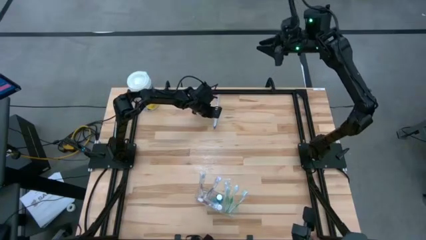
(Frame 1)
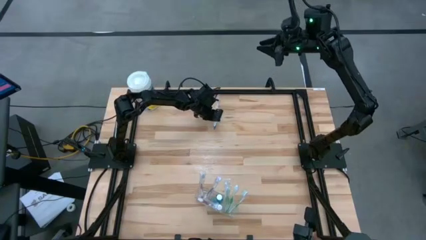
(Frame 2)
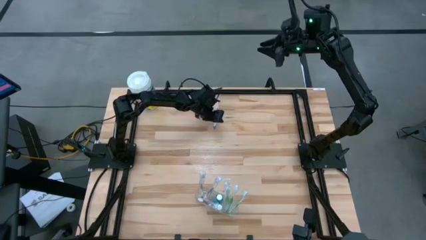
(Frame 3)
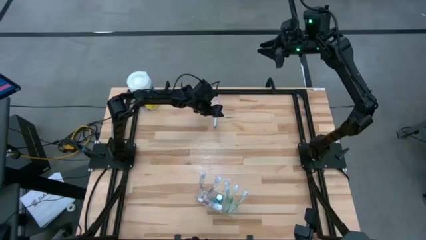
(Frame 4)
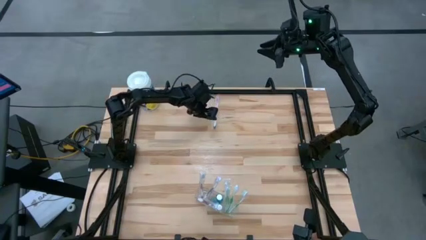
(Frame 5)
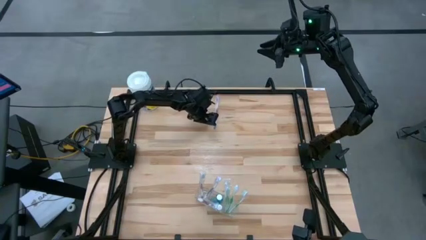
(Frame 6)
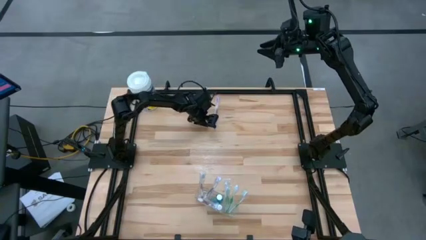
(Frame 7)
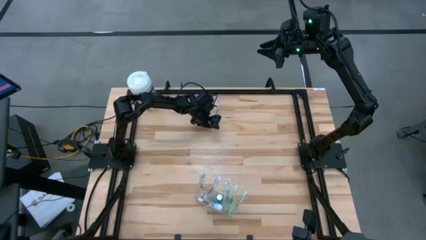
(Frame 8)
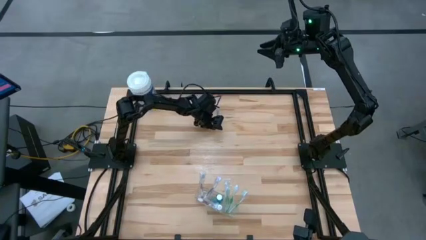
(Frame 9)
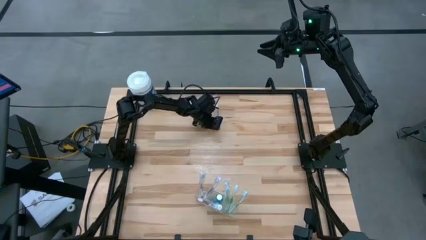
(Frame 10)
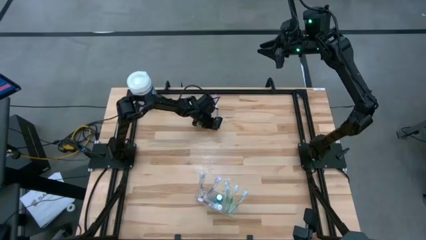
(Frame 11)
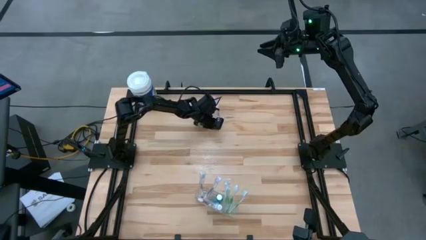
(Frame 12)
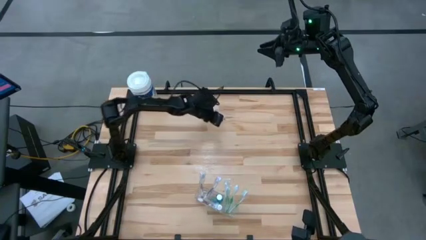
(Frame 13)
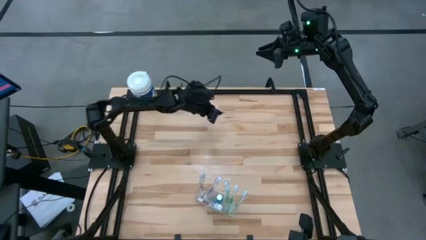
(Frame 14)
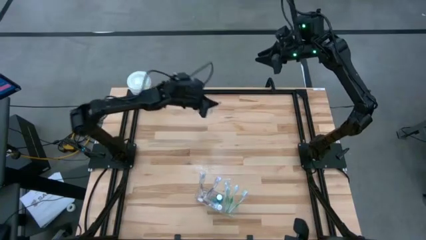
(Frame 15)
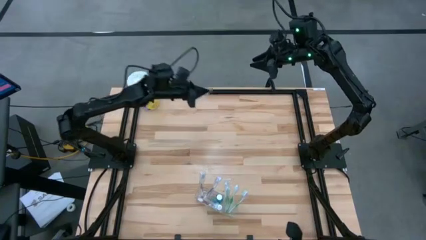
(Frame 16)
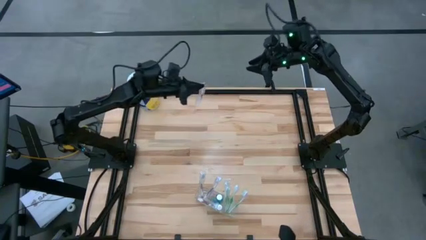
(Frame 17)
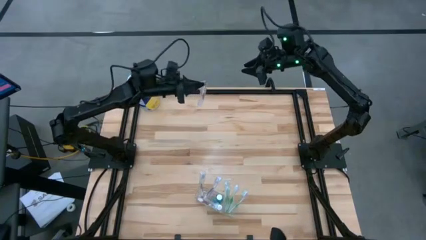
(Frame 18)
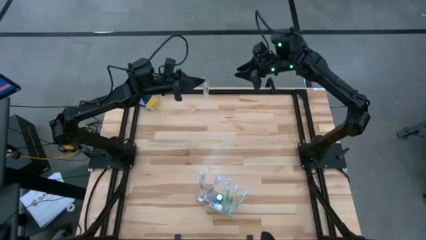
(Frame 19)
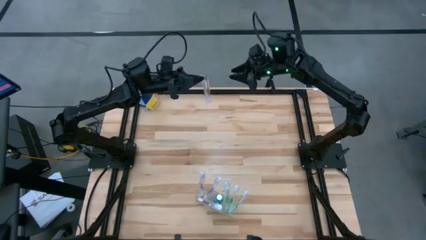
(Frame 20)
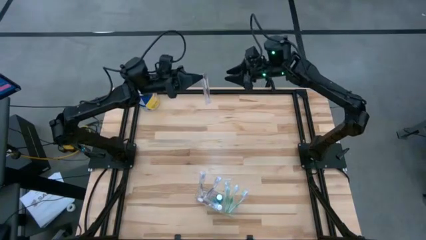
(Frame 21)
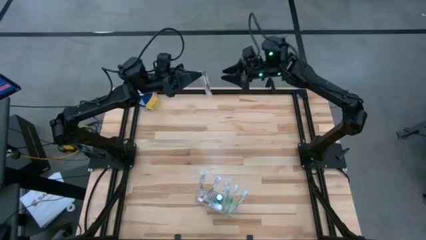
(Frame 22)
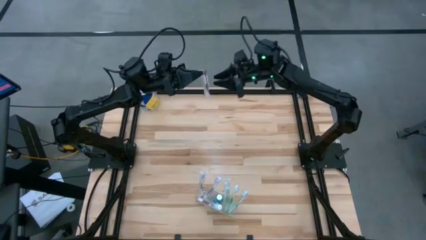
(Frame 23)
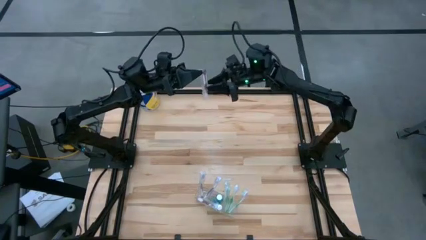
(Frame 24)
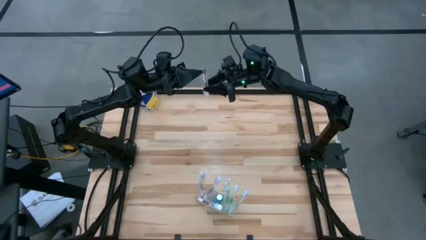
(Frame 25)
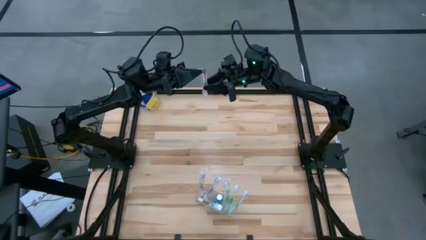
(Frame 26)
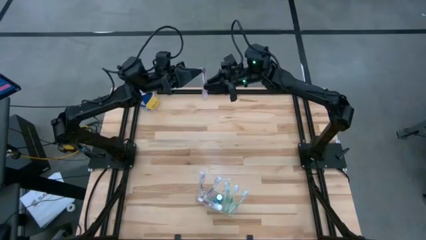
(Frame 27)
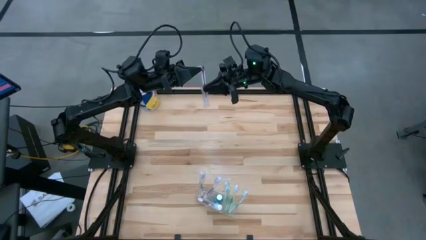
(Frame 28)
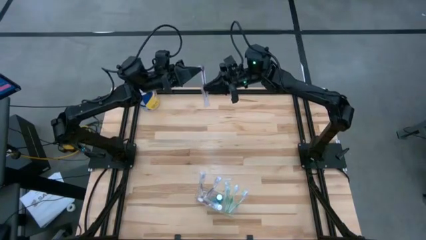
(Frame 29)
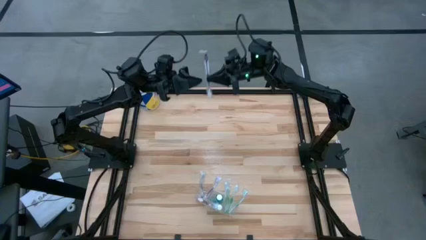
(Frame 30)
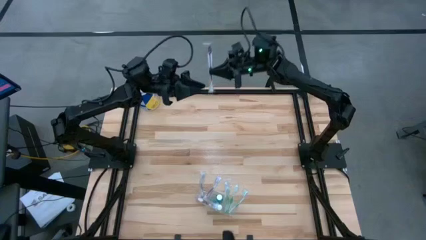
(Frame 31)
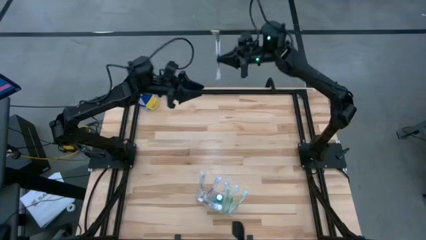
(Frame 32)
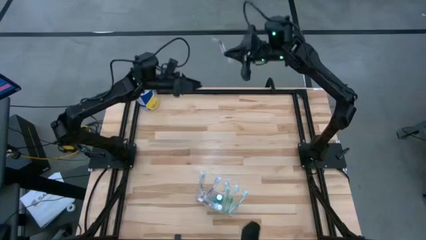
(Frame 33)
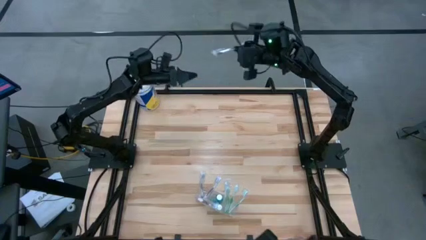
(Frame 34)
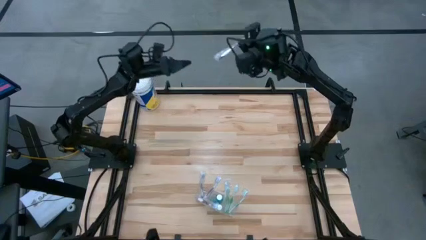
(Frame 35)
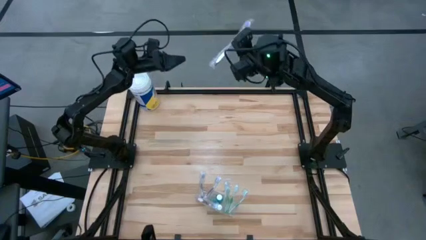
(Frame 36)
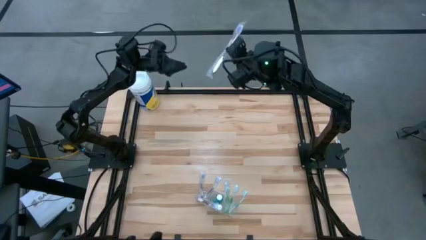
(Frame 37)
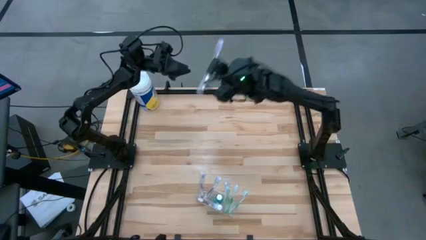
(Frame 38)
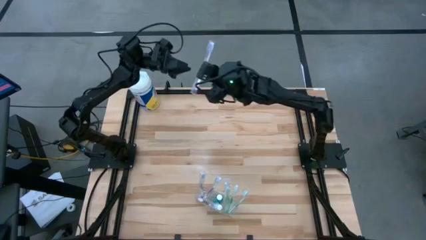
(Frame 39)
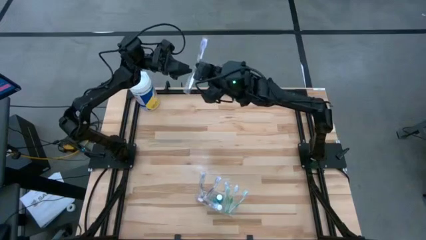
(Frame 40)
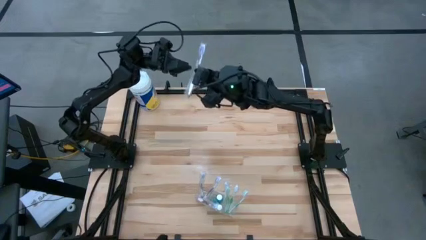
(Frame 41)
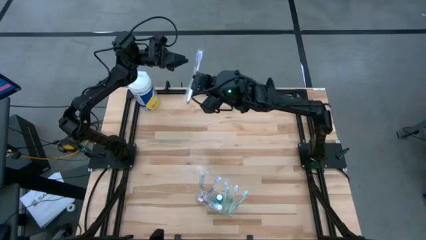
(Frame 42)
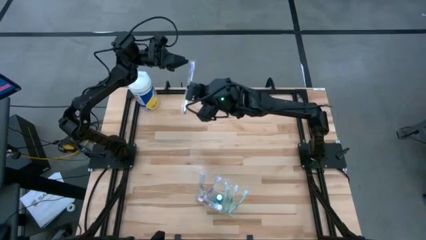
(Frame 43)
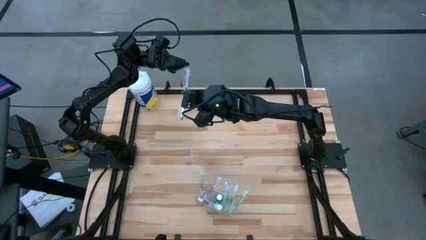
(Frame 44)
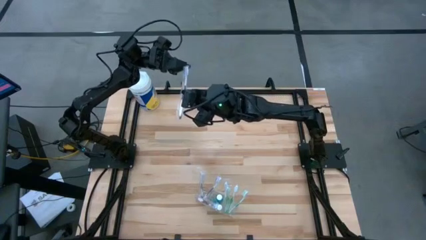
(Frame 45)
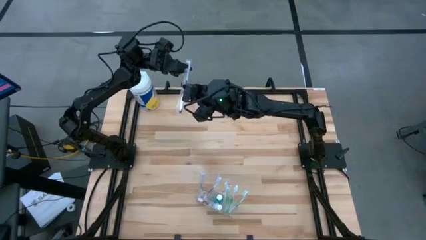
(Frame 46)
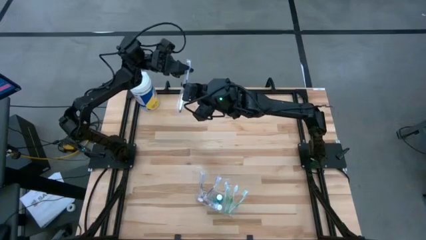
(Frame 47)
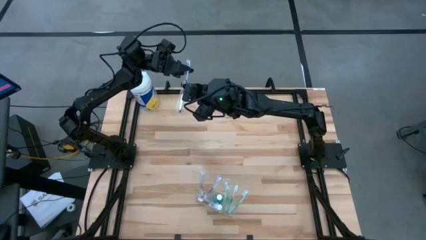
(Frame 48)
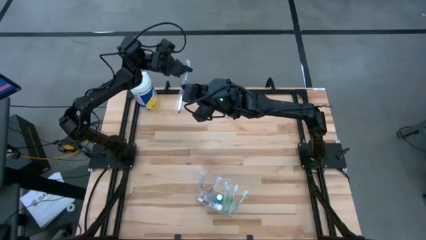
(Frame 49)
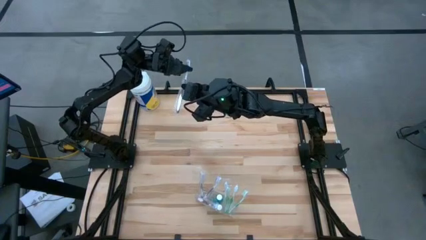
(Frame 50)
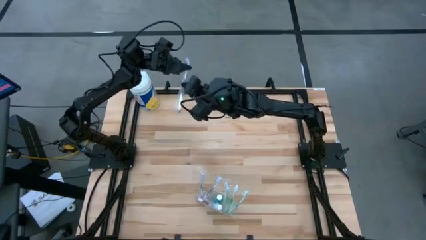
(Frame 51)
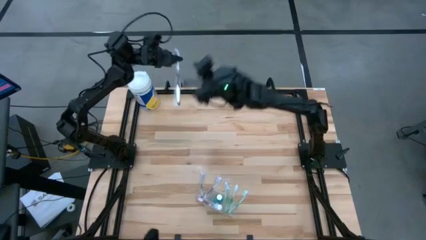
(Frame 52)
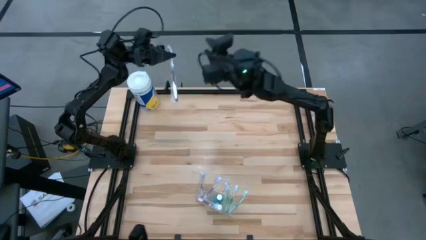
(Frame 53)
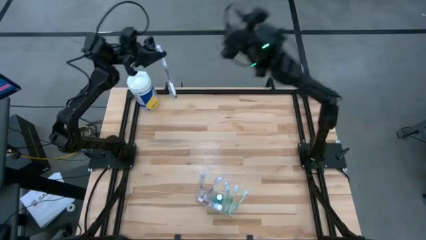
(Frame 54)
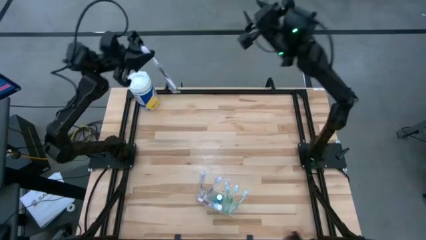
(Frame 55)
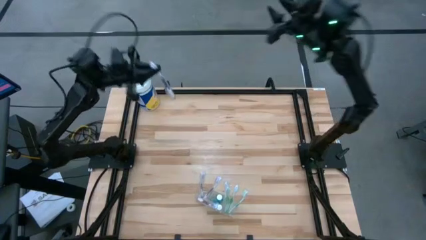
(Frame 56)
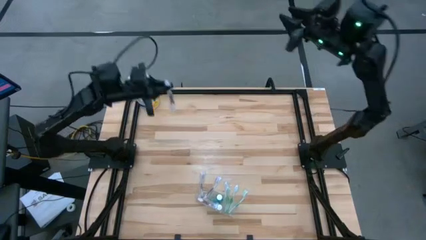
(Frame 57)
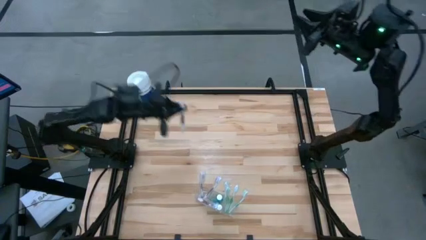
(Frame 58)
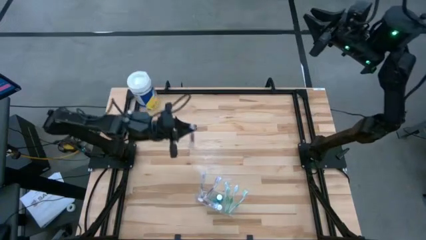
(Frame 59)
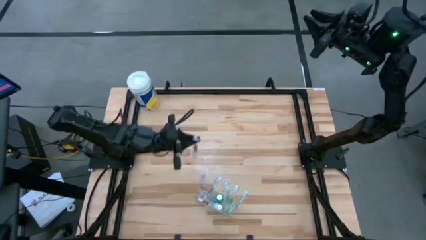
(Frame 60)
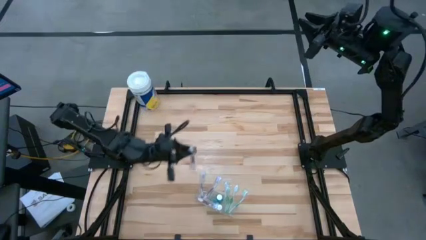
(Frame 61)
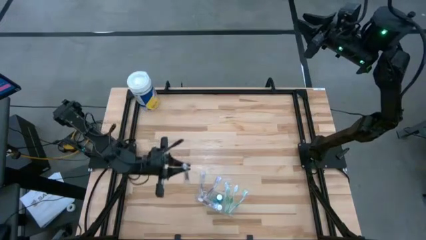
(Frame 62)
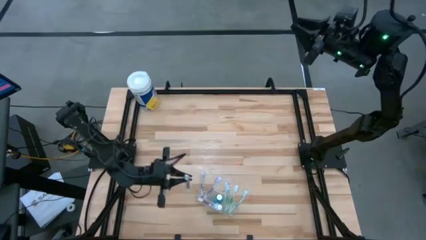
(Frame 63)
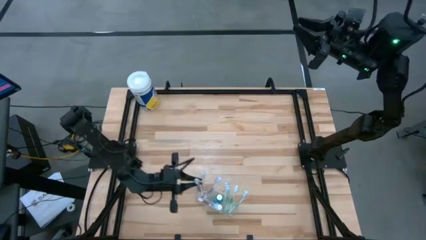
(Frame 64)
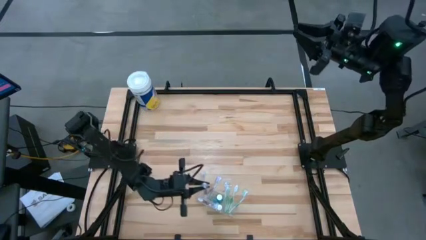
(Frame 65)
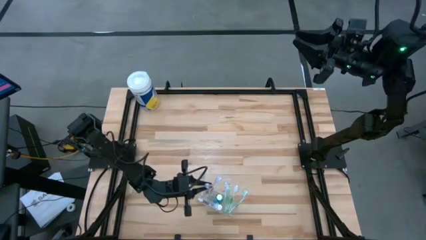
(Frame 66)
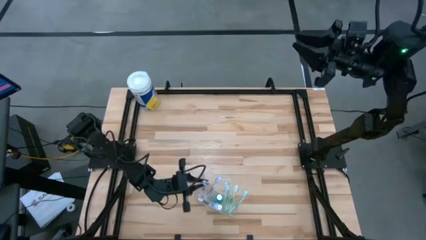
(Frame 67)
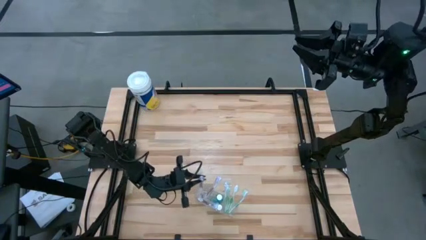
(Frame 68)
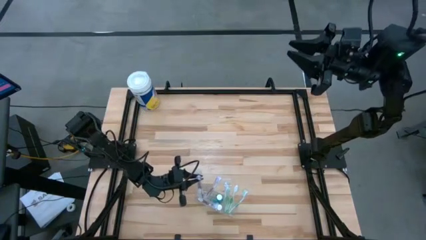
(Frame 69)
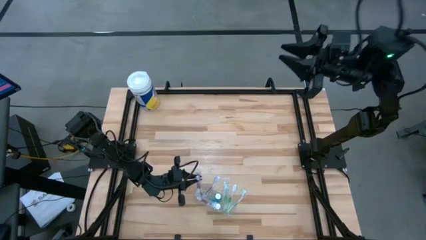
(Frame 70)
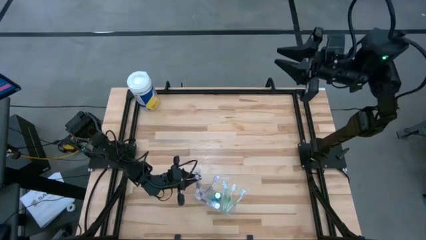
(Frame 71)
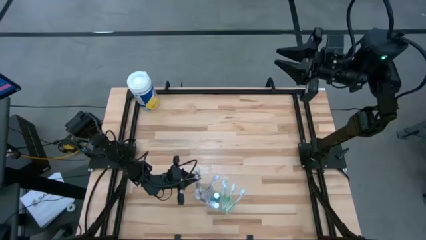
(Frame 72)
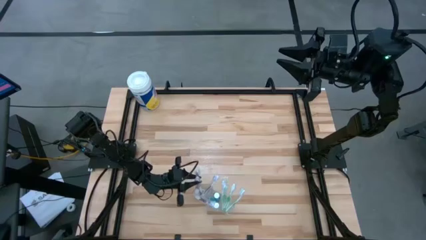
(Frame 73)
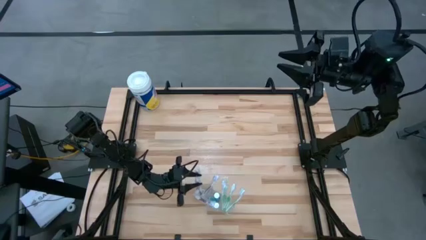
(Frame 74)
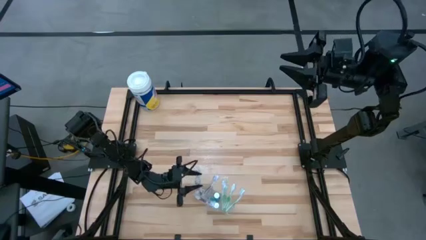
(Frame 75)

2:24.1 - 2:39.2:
Task: Pick & Place toothbrushing station
Put the purple toothbrush in the transparent organizer

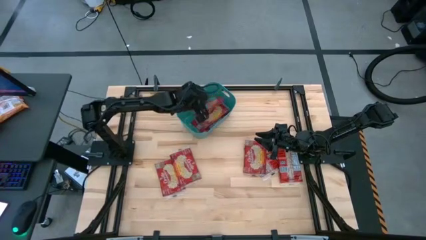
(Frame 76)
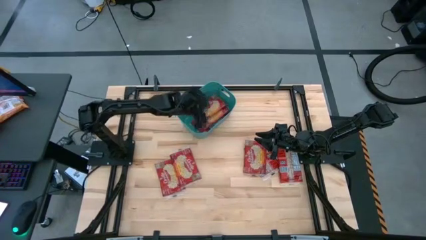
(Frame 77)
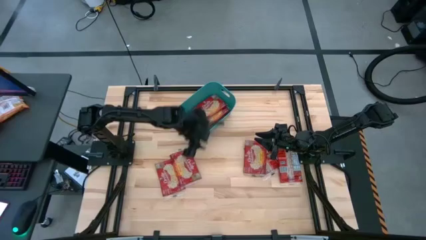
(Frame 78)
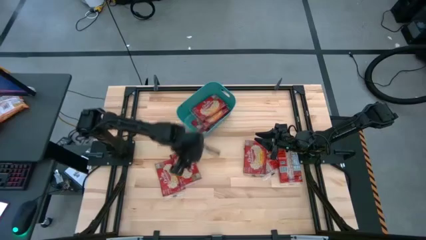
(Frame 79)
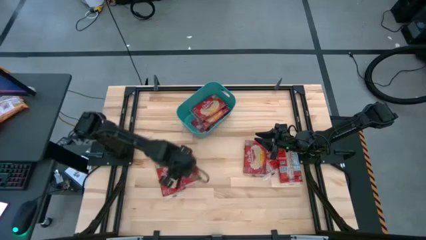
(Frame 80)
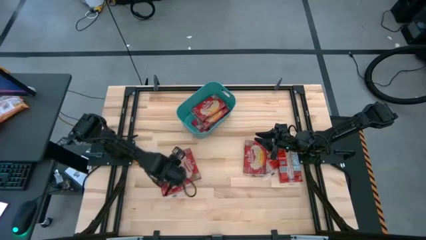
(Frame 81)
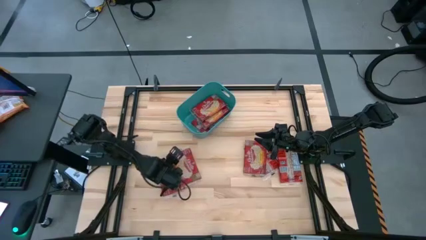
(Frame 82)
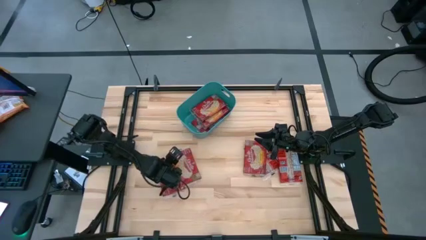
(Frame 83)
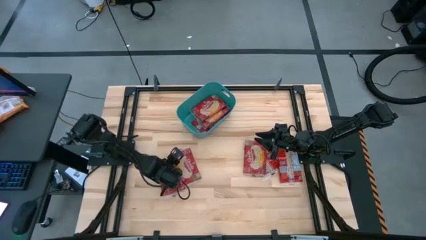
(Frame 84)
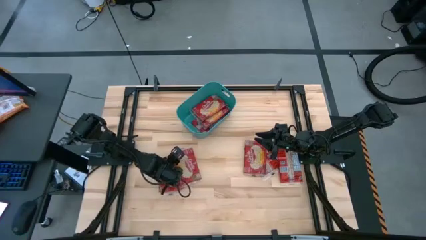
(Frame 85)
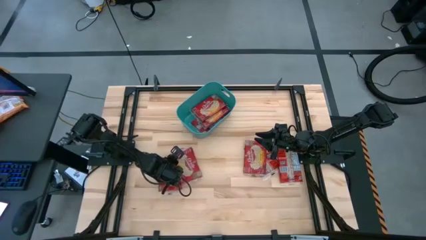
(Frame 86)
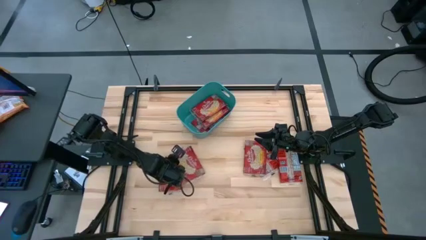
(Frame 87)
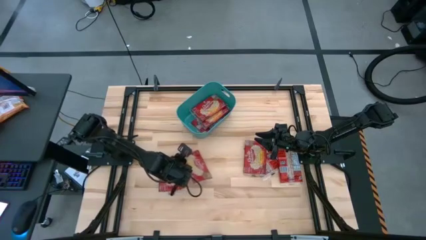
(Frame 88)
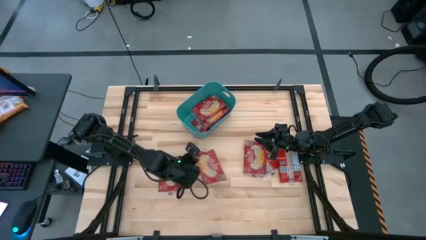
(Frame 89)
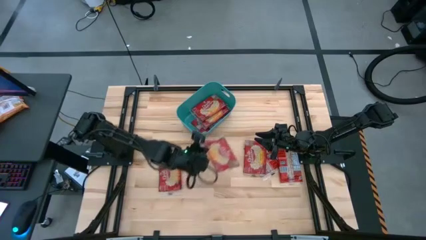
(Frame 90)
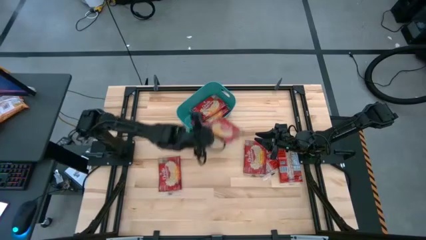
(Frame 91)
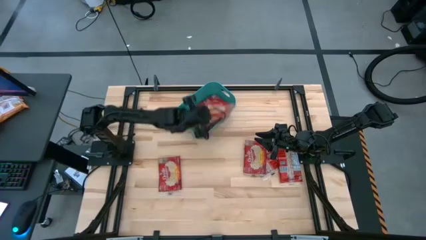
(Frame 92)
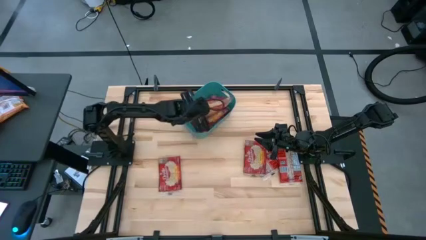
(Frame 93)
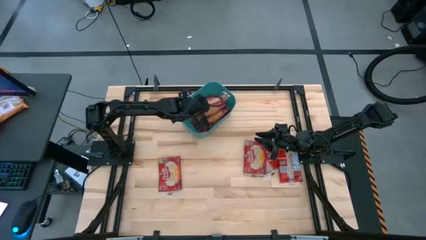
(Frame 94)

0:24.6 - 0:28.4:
Task: Sort popcorn bags into baskets
Put the red popcorn bag into the green container
